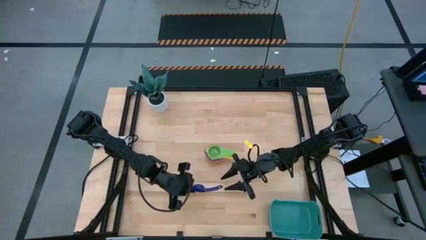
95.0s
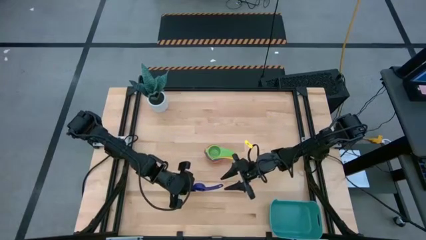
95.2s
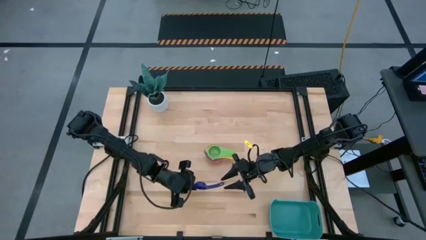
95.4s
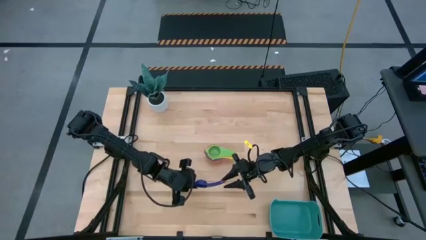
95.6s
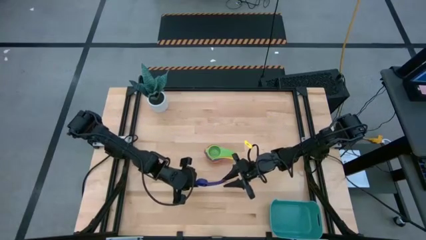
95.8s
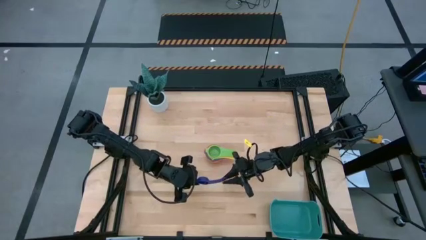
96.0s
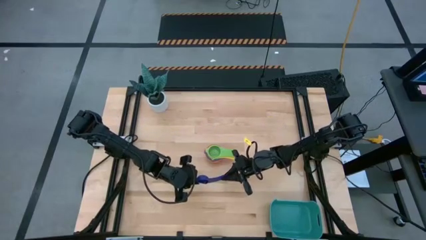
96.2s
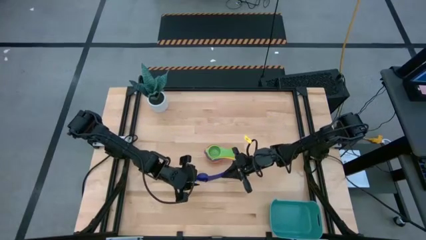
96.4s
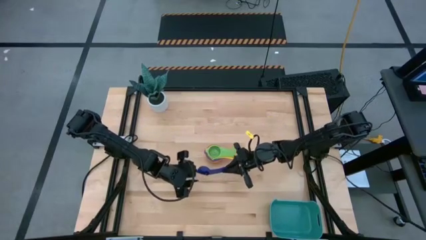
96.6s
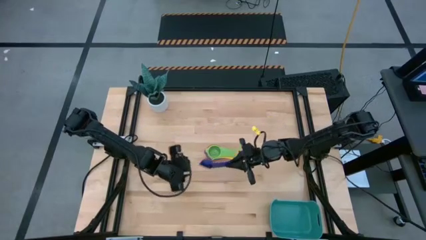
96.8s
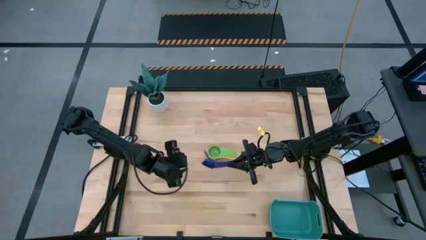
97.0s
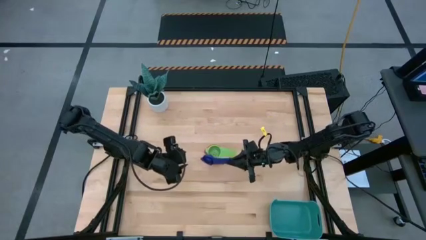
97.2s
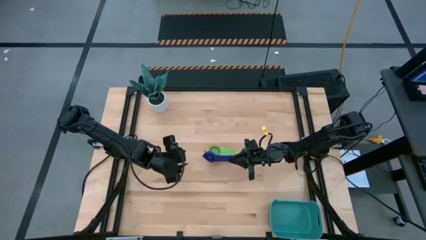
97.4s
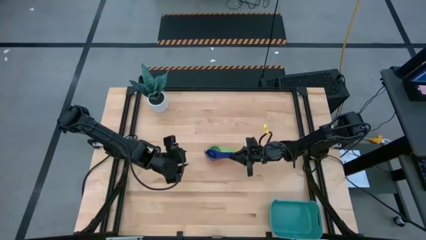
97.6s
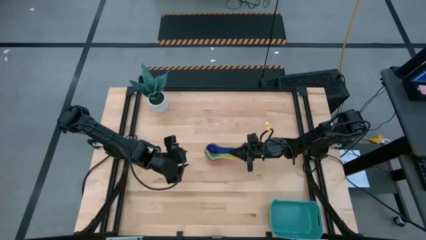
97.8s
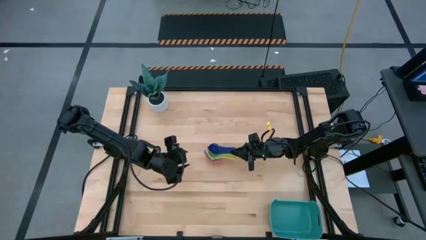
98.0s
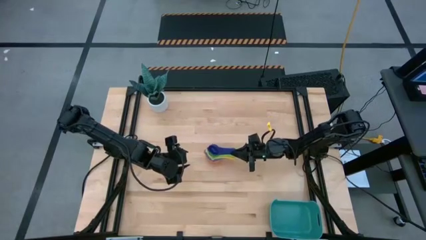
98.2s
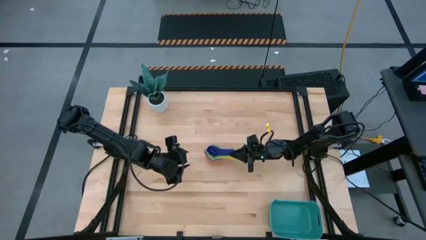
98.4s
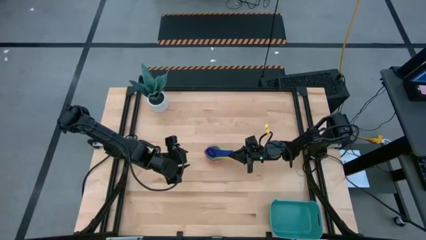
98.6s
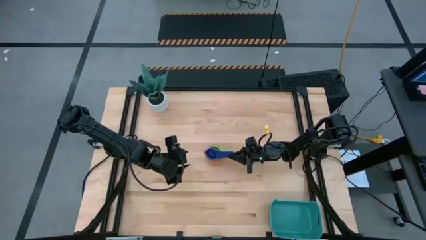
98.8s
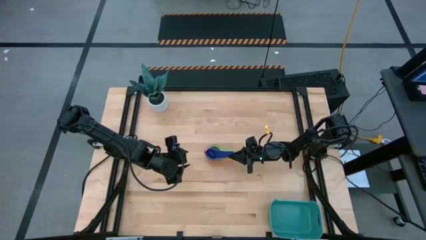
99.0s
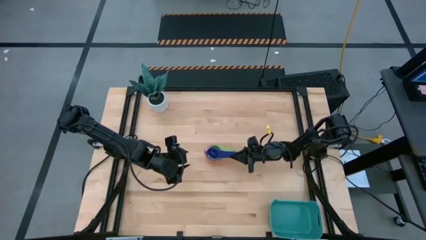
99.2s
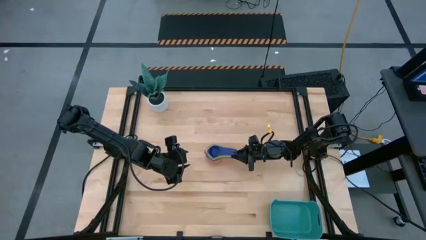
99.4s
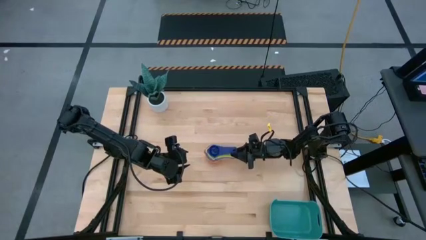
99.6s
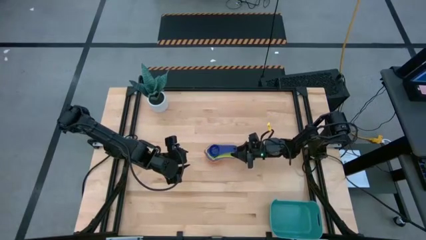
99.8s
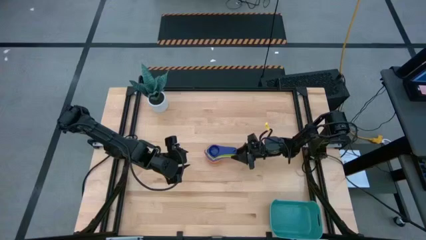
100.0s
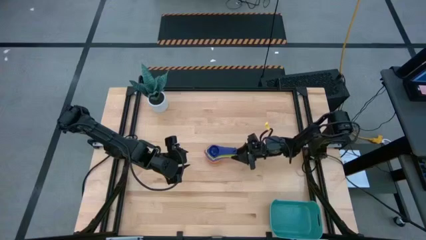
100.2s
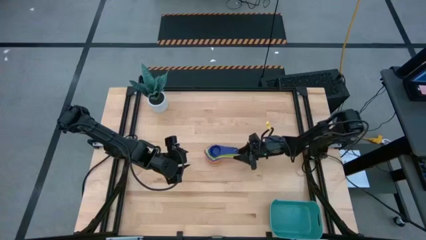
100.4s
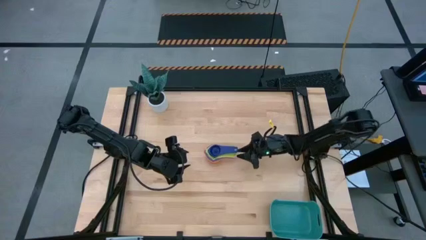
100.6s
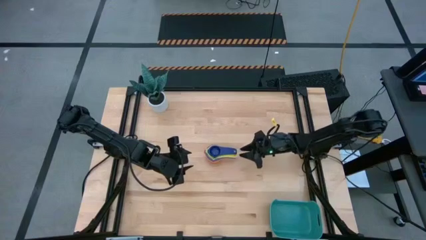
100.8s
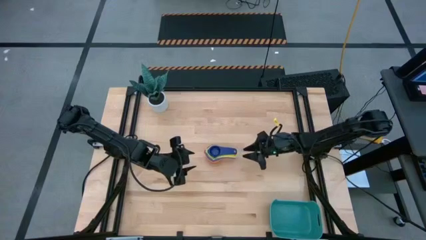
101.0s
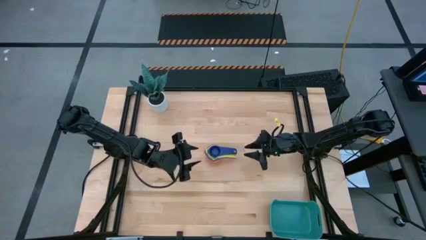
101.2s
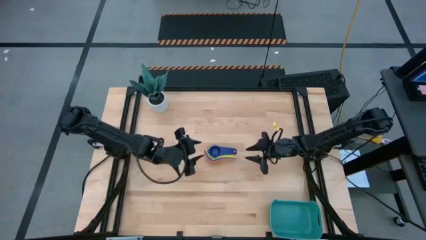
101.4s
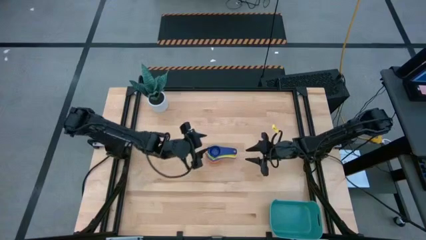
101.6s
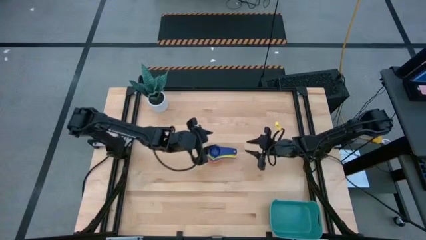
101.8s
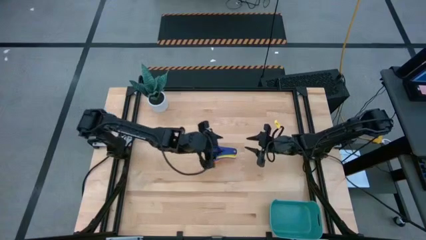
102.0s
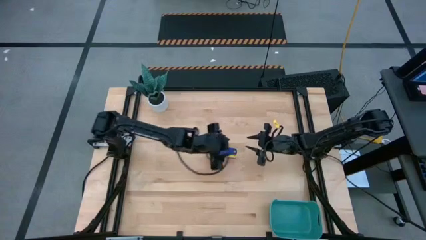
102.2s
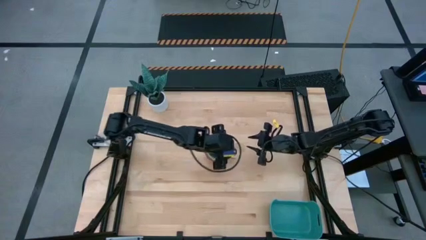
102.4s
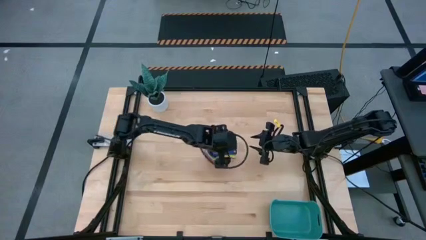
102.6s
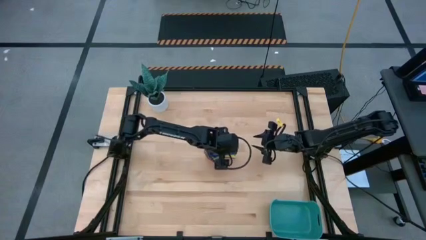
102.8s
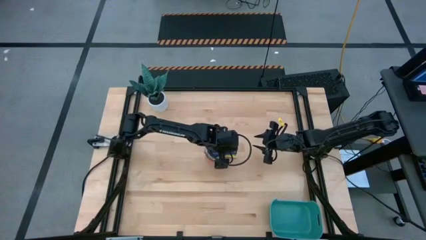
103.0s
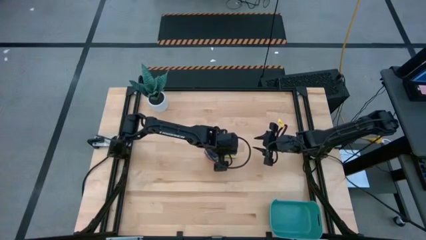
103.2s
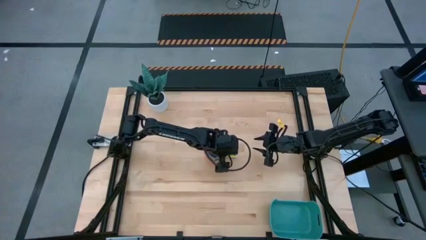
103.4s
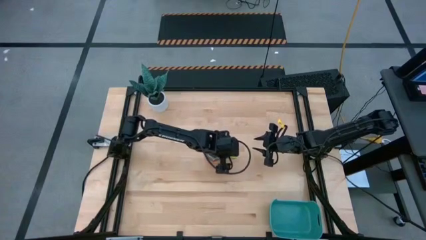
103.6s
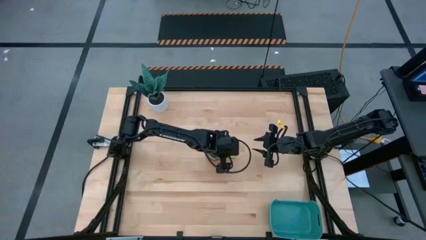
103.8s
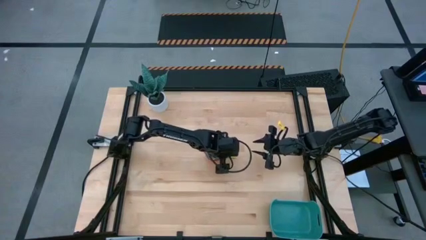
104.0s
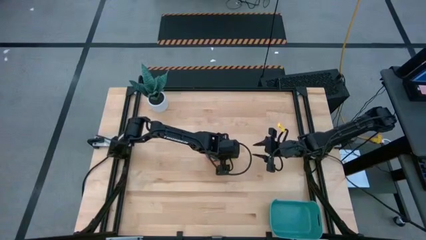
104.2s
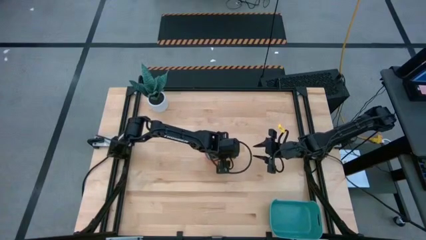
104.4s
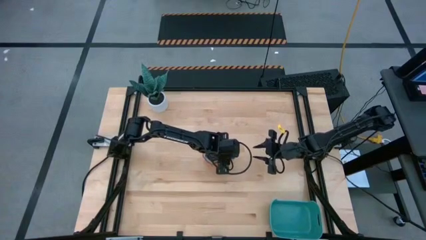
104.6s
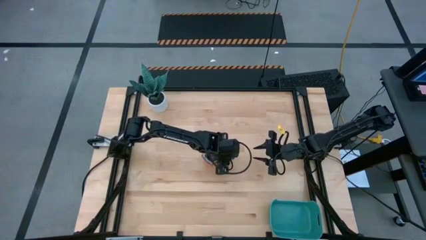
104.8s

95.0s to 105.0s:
Task: Nest measuring cups in basket
Stack the dark blue measuring cup on top of the green measuring cup
